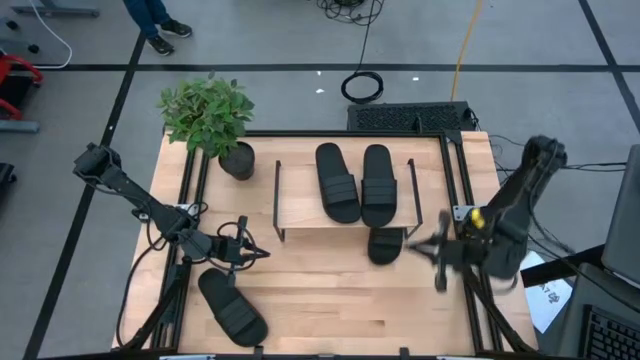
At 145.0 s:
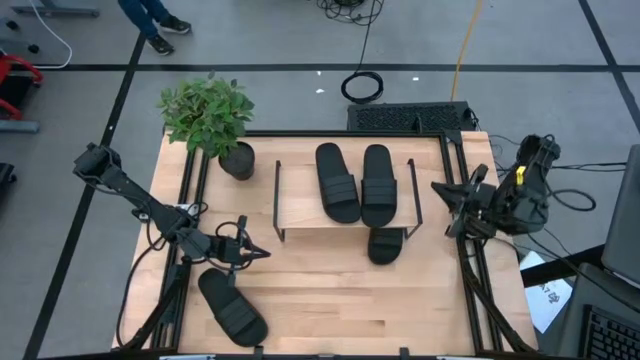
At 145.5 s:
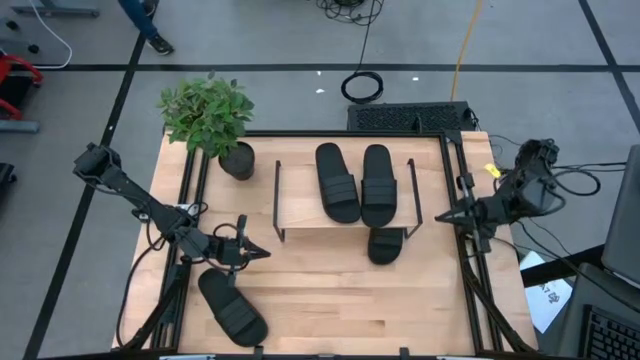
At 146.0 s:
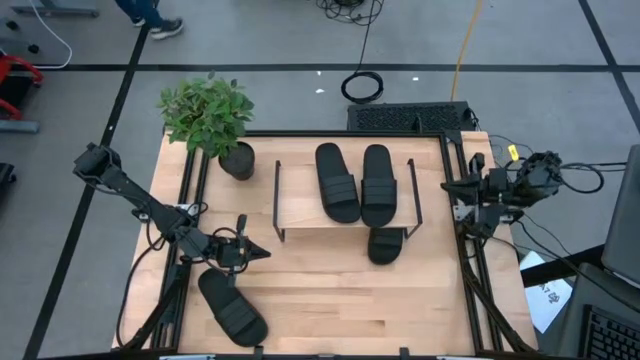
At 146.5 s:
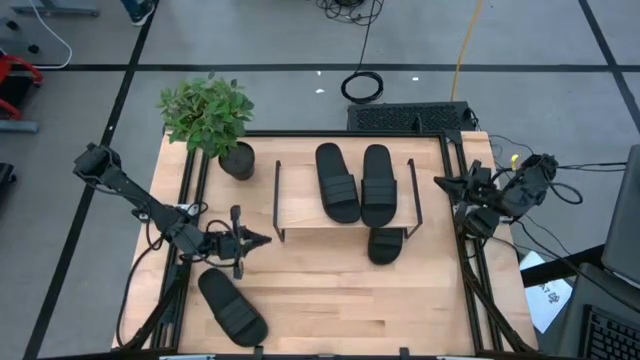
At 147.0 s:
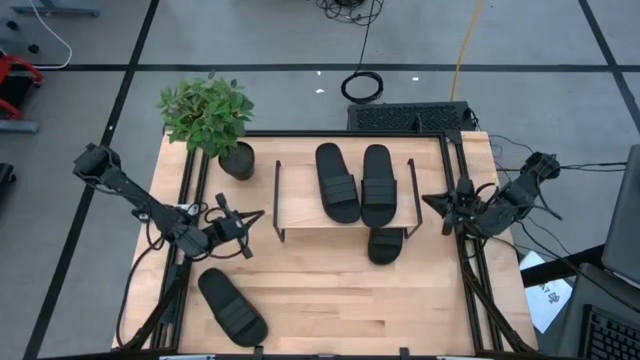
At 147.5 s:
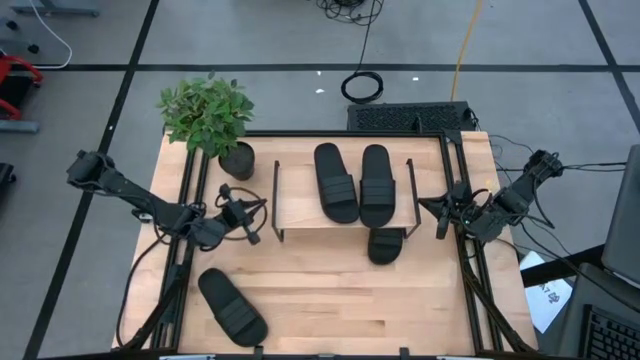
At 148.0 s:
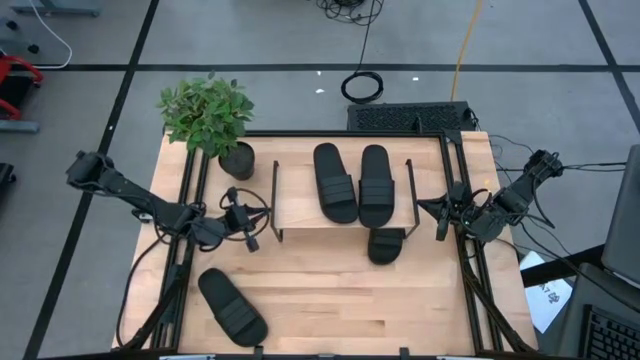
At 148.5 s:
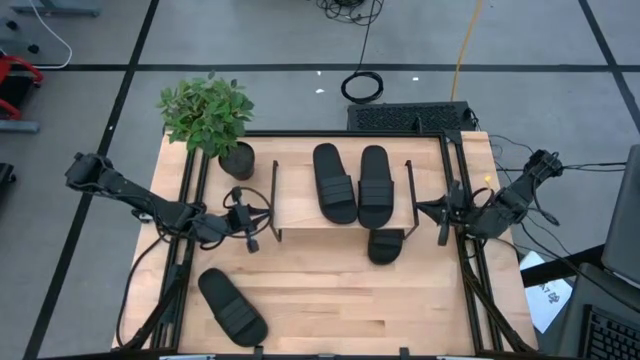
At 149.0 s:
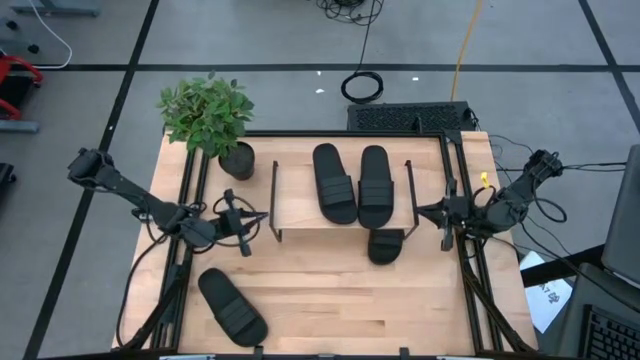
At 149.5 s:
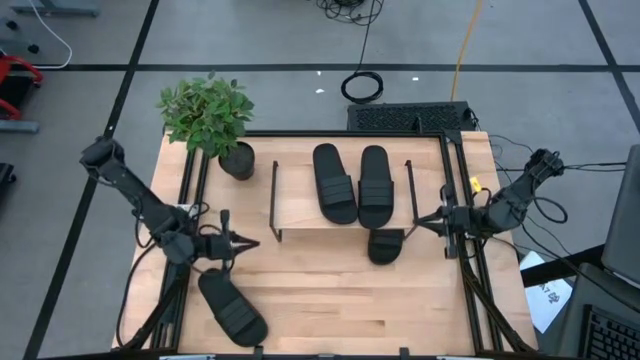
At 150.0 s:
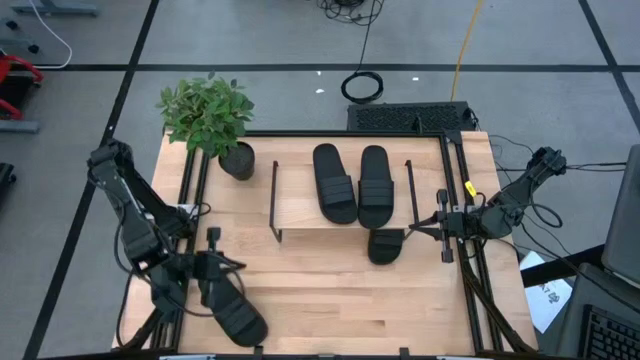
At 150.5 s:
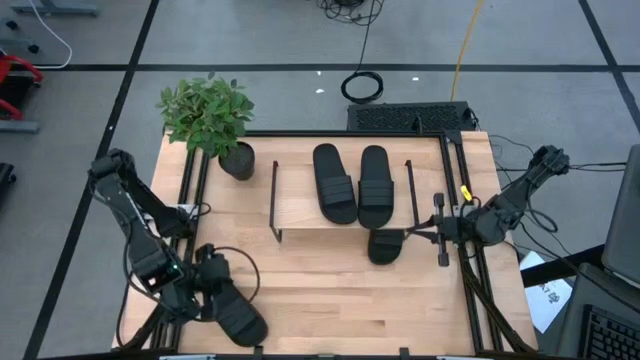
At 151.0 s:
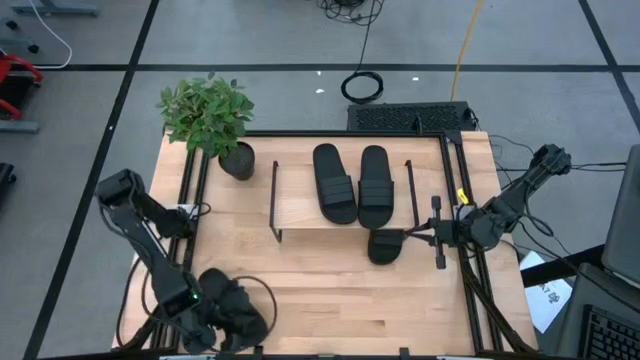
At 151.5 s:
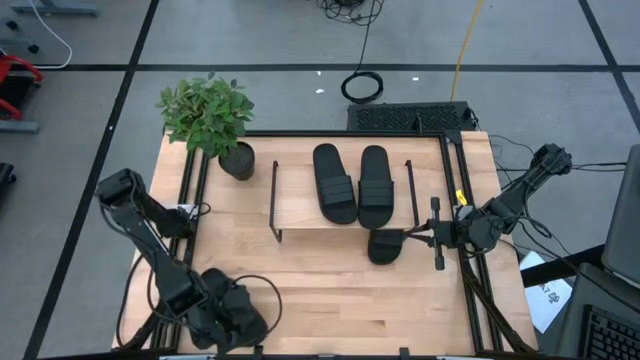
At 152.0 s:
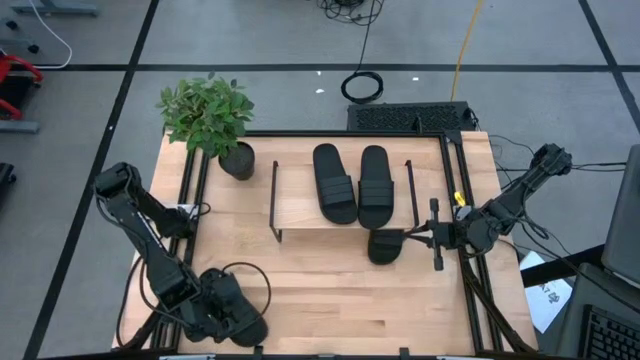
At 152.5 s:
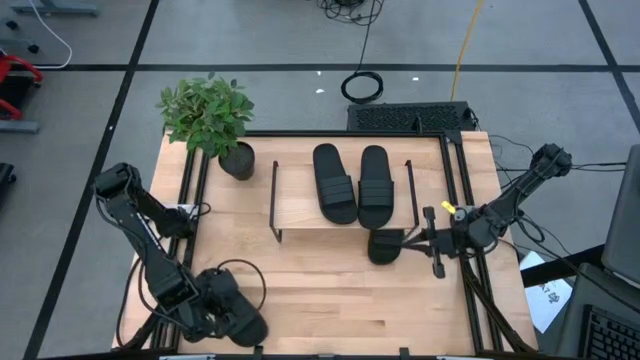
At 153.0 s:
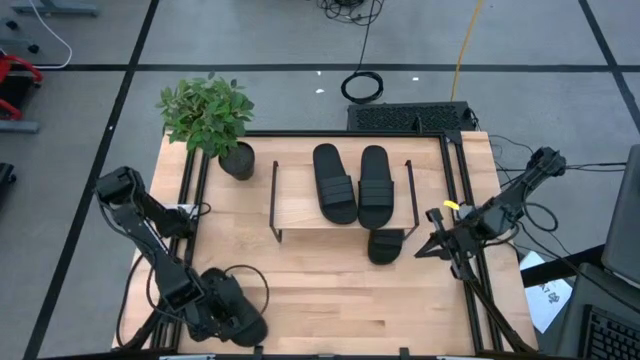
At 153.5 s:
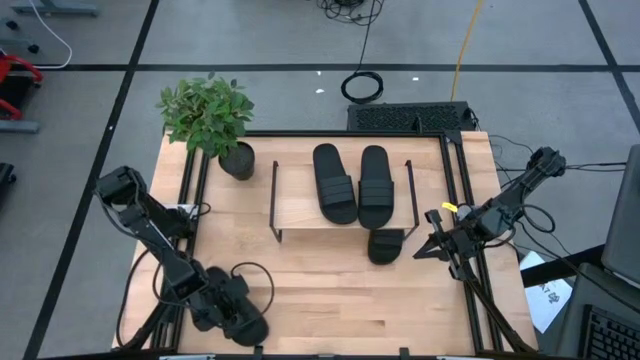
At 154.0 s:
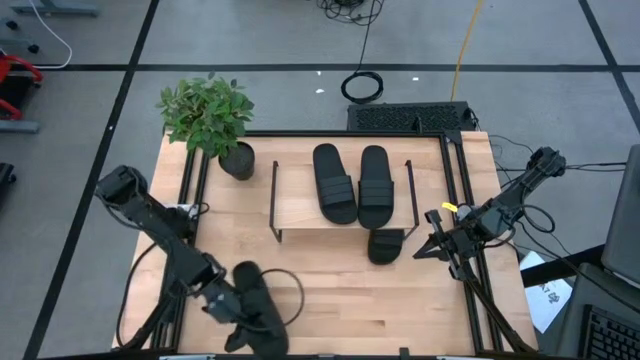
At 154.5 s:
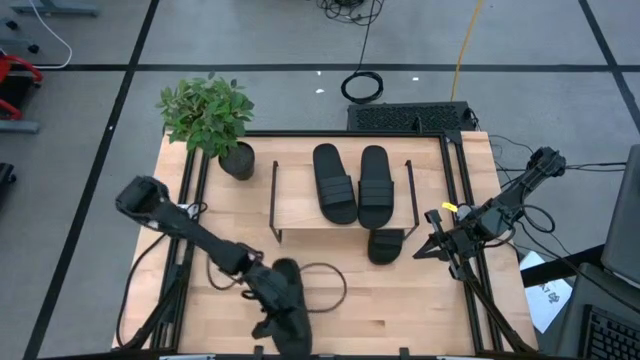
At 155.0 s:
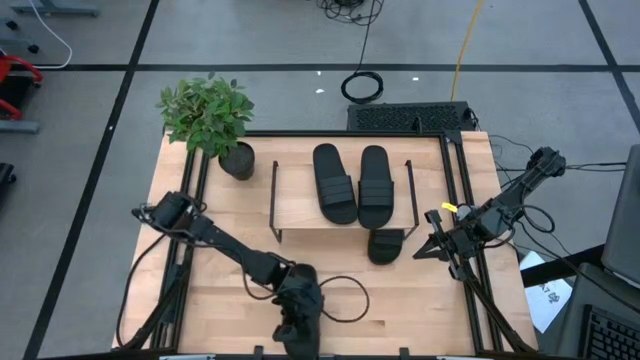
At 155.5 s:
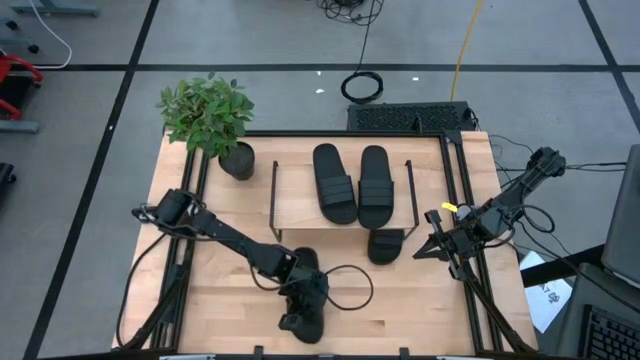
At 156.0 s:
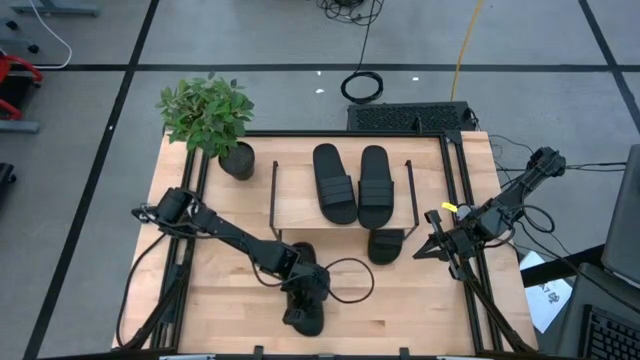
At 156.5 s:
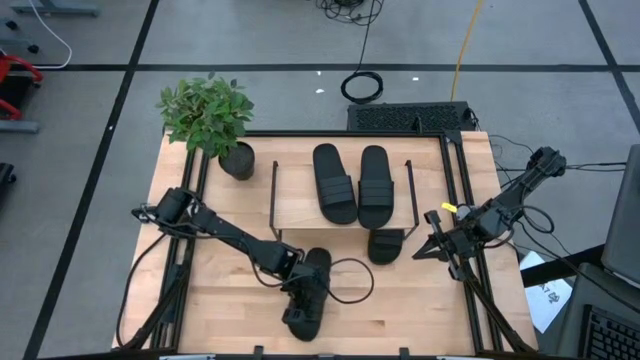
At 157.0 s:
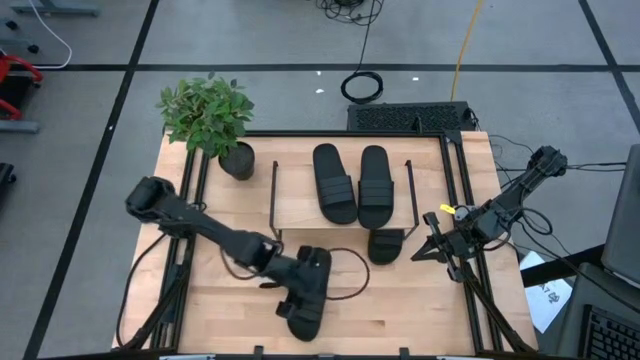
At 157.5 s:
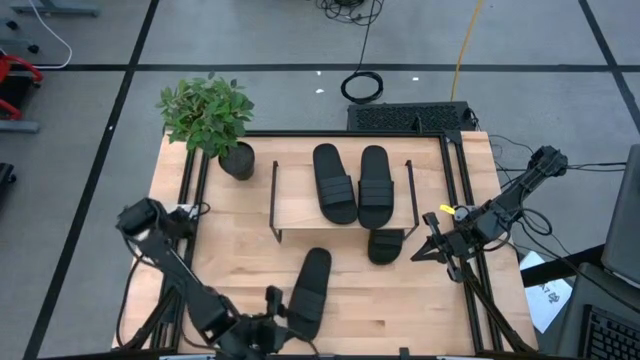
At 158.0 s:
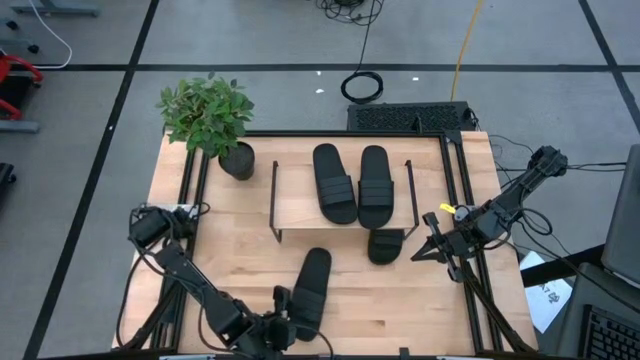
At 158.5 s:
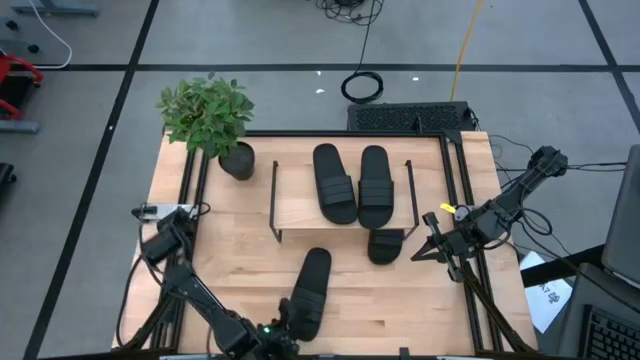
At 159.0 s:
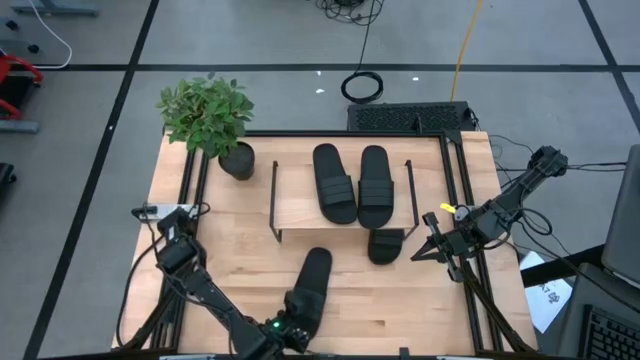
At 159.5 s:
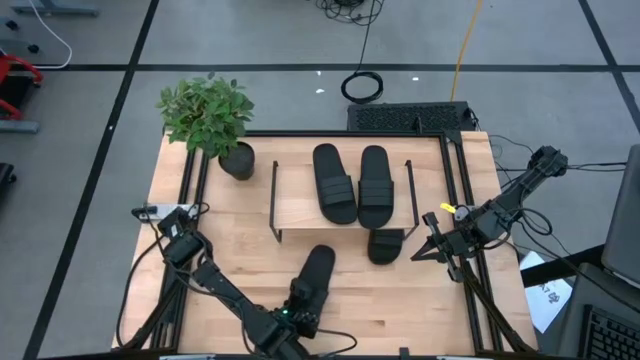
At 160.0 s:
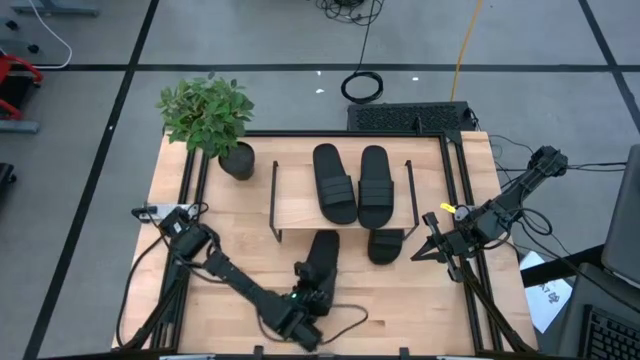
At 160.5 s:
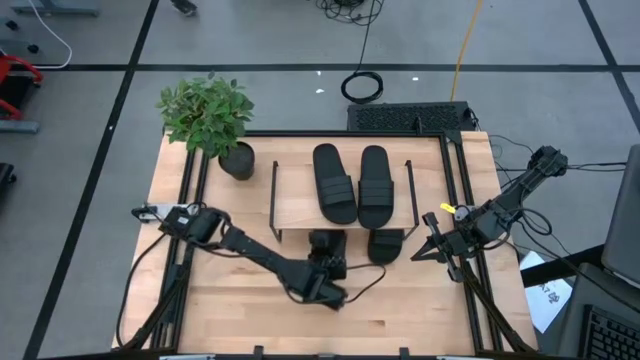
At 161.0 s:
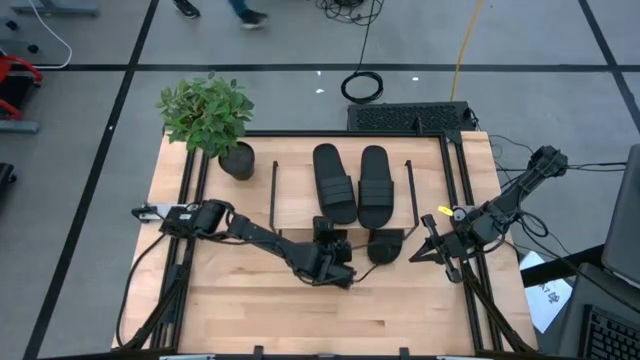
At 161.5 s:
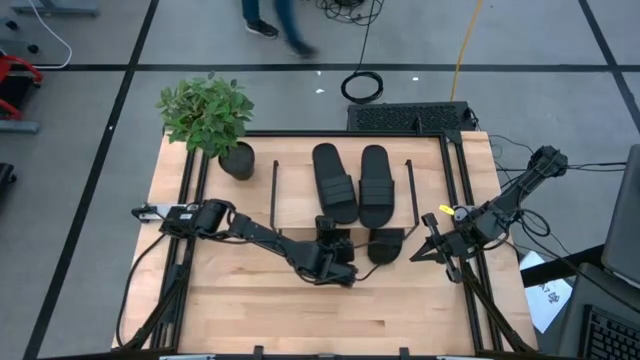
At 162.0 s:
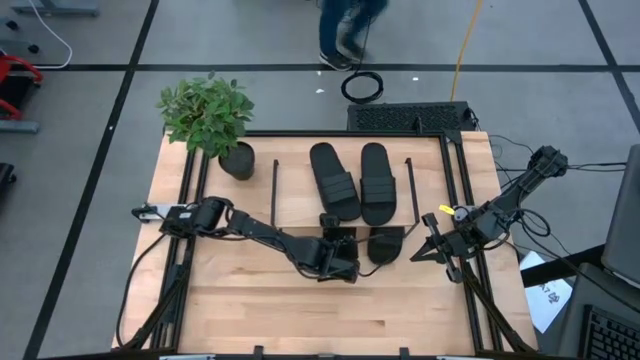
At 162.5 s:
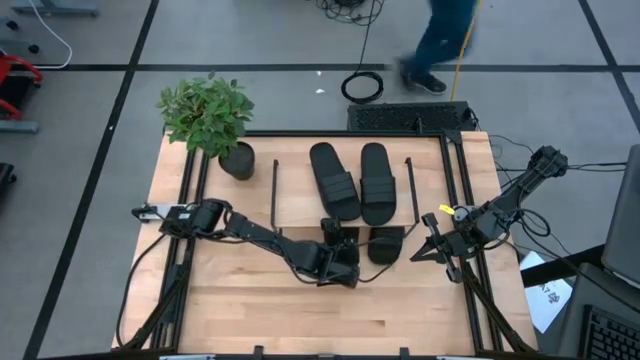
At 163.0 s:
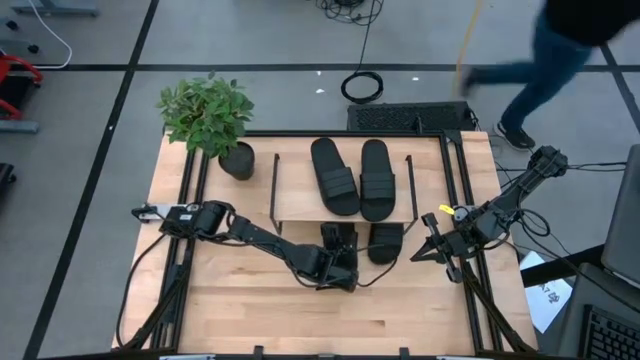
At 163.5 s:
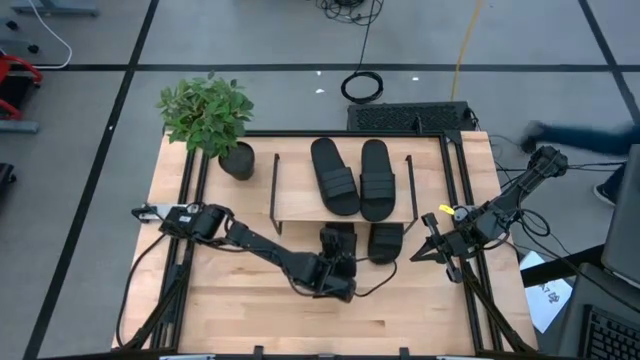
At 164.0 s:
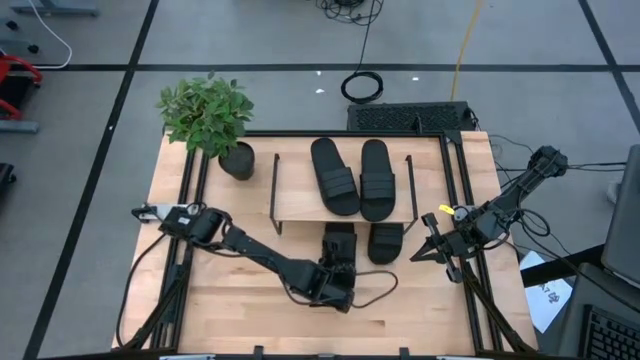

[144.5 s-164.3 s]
Task: Pick and place slides into the shelf
Put the black slide under the shelf
